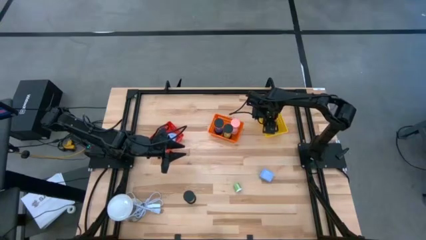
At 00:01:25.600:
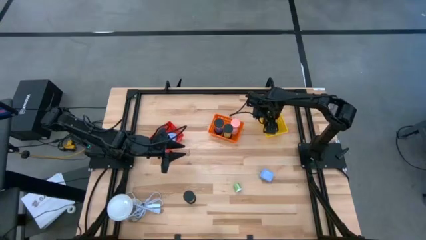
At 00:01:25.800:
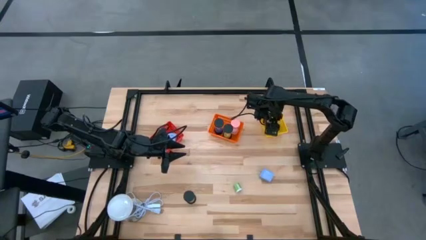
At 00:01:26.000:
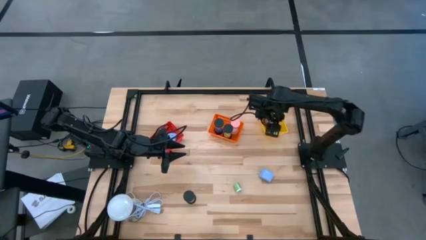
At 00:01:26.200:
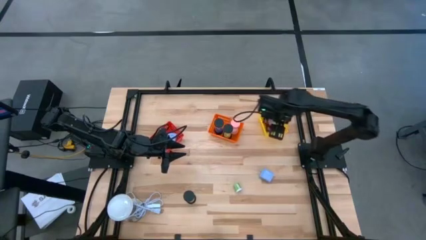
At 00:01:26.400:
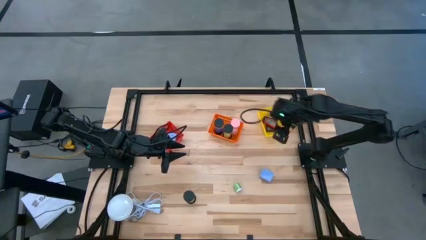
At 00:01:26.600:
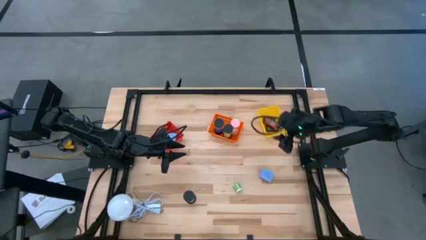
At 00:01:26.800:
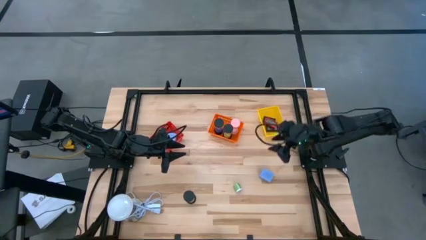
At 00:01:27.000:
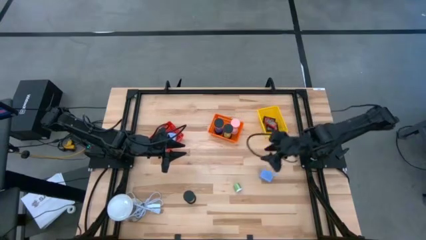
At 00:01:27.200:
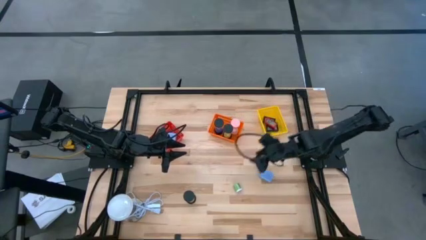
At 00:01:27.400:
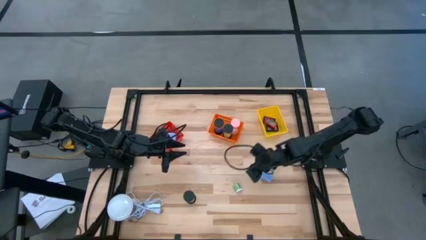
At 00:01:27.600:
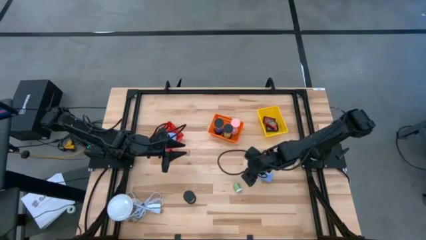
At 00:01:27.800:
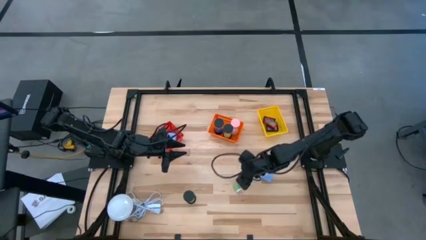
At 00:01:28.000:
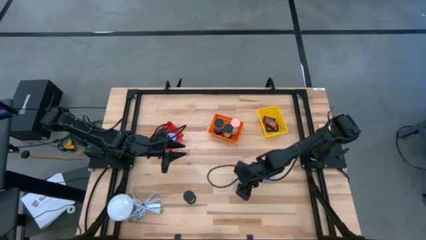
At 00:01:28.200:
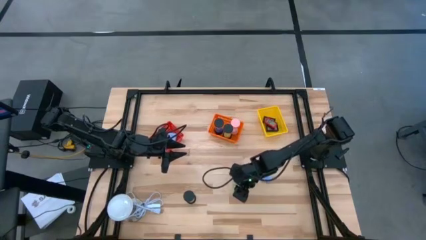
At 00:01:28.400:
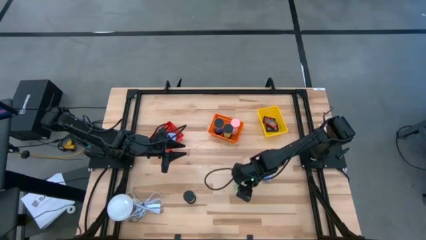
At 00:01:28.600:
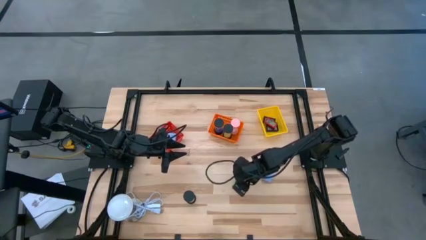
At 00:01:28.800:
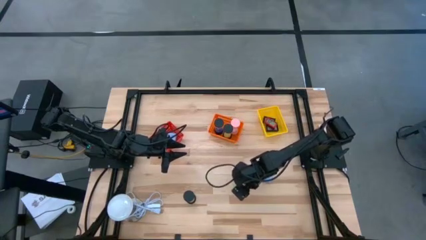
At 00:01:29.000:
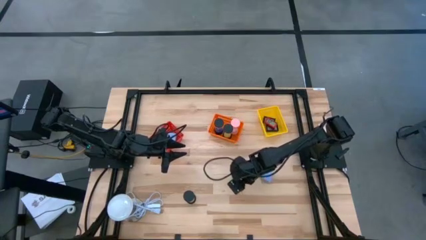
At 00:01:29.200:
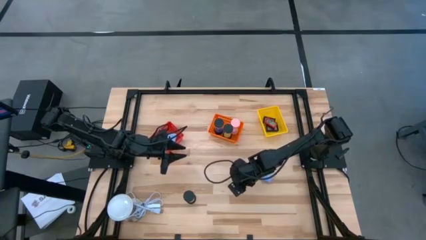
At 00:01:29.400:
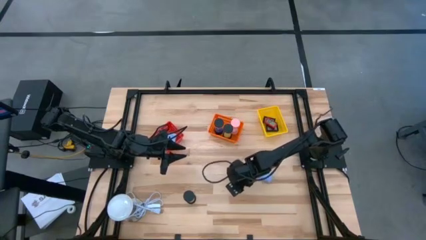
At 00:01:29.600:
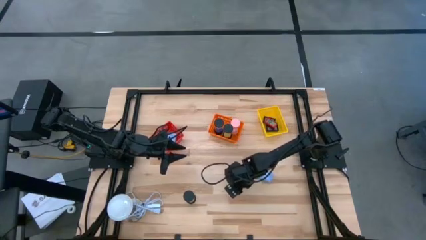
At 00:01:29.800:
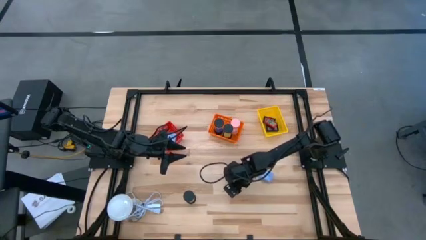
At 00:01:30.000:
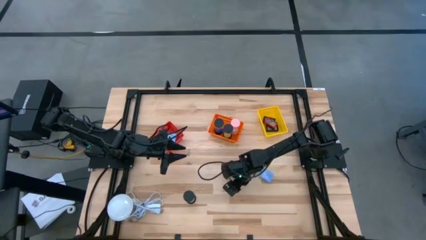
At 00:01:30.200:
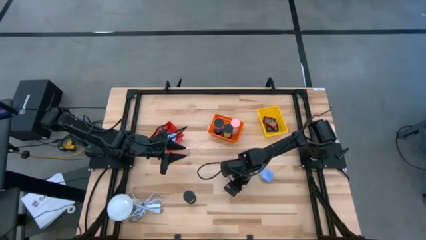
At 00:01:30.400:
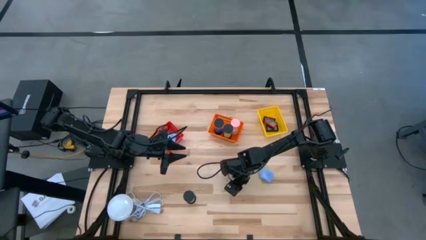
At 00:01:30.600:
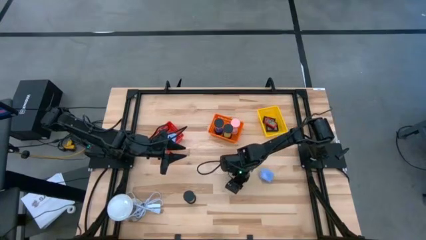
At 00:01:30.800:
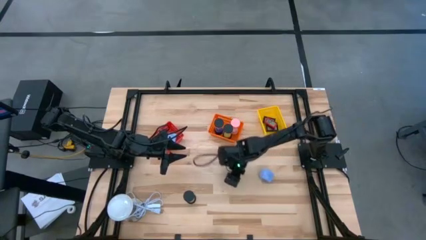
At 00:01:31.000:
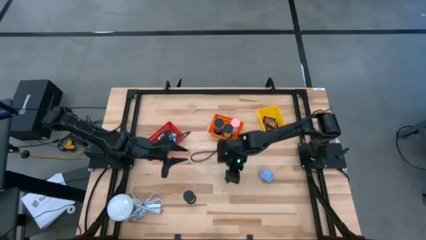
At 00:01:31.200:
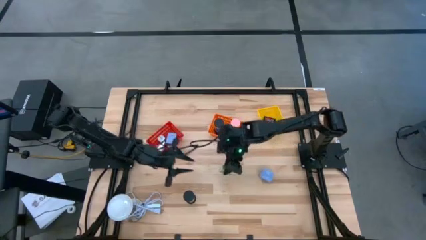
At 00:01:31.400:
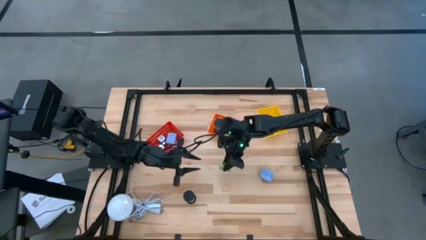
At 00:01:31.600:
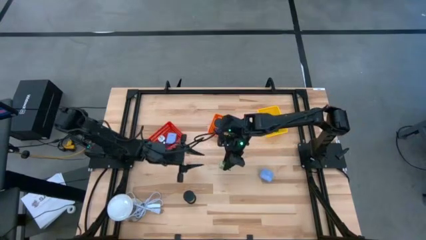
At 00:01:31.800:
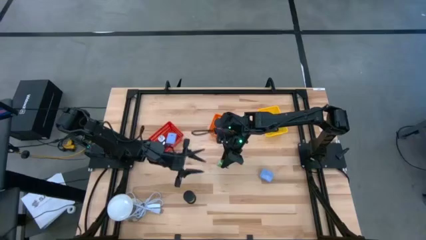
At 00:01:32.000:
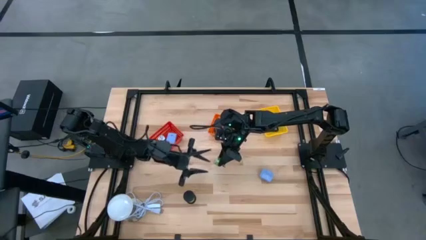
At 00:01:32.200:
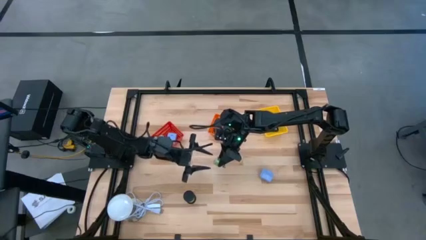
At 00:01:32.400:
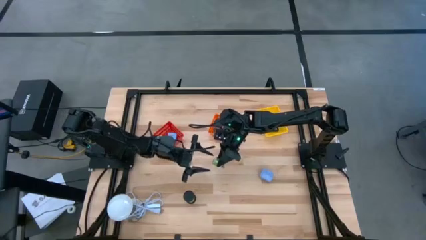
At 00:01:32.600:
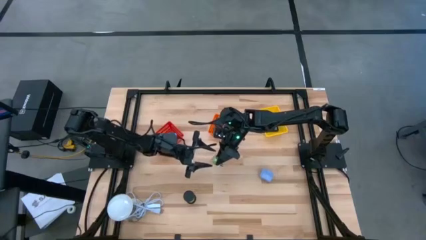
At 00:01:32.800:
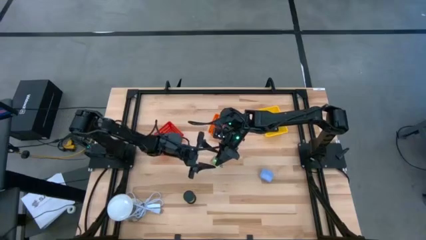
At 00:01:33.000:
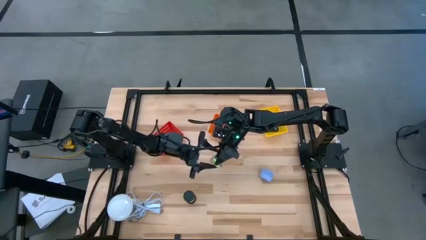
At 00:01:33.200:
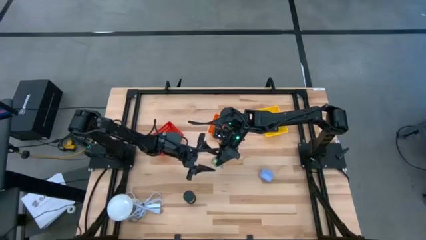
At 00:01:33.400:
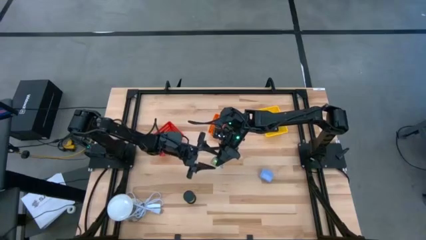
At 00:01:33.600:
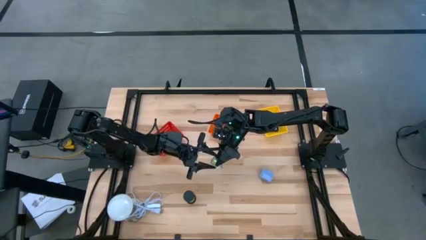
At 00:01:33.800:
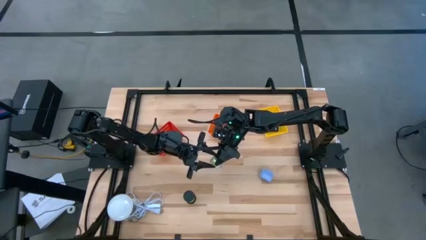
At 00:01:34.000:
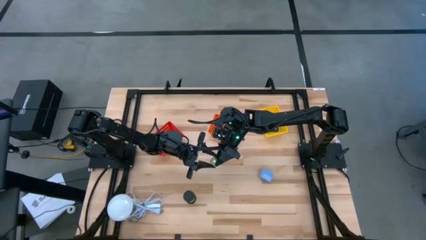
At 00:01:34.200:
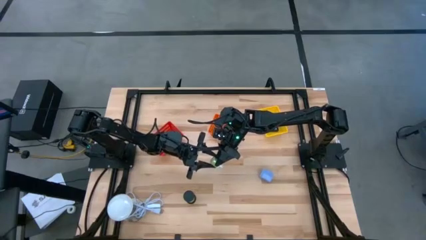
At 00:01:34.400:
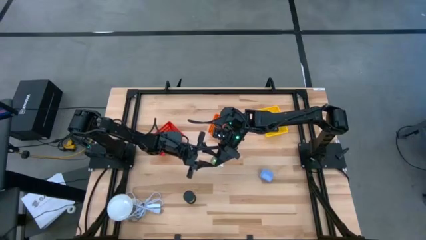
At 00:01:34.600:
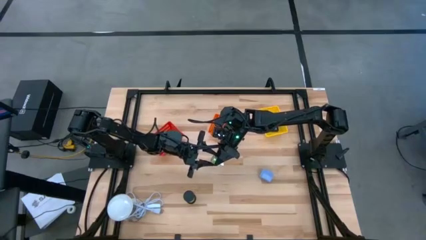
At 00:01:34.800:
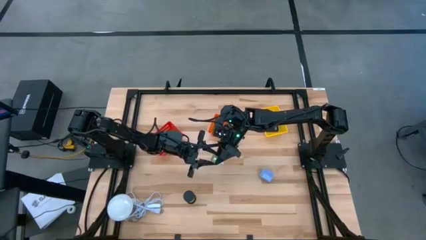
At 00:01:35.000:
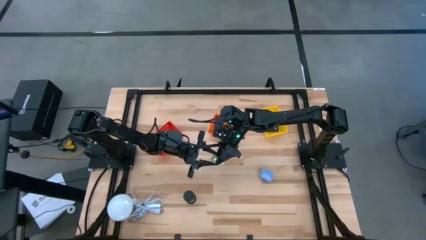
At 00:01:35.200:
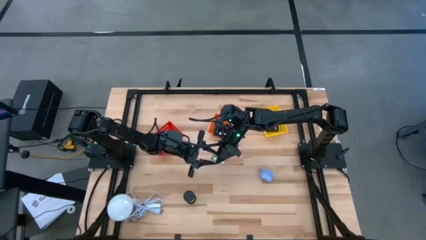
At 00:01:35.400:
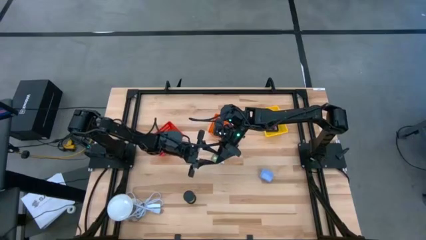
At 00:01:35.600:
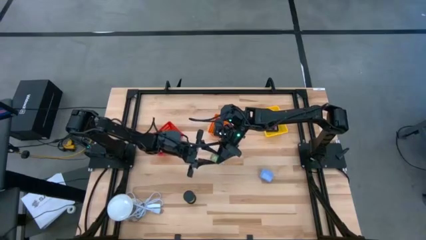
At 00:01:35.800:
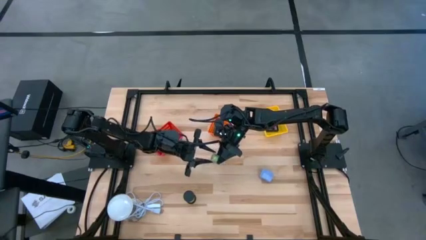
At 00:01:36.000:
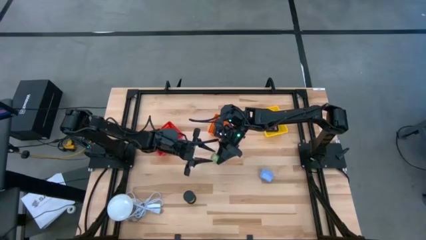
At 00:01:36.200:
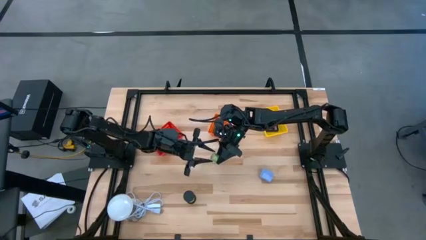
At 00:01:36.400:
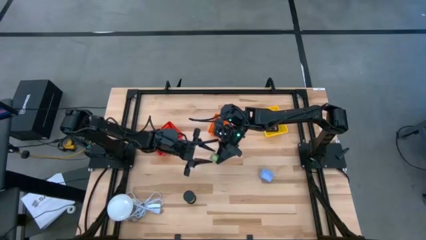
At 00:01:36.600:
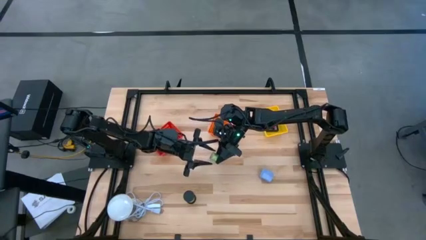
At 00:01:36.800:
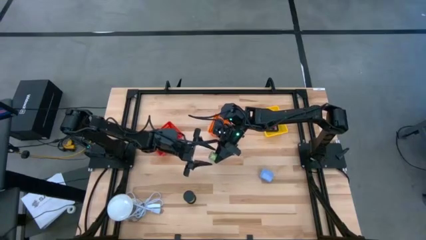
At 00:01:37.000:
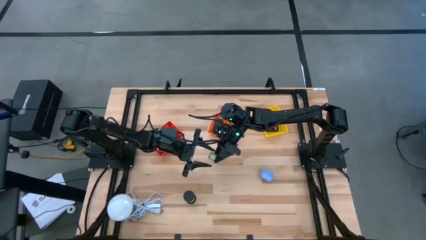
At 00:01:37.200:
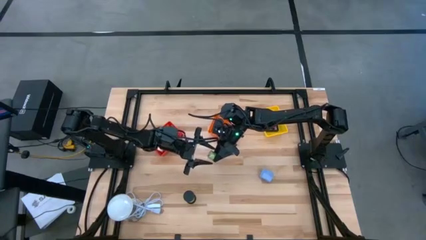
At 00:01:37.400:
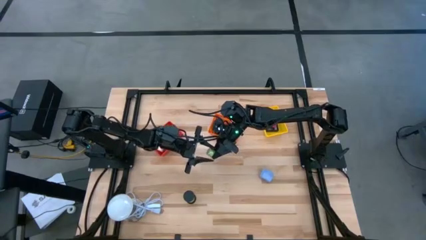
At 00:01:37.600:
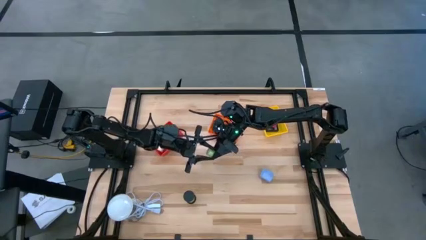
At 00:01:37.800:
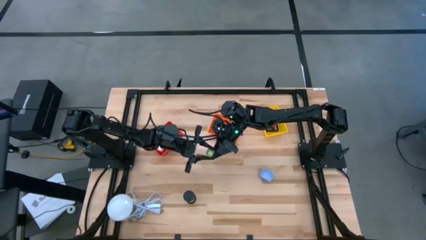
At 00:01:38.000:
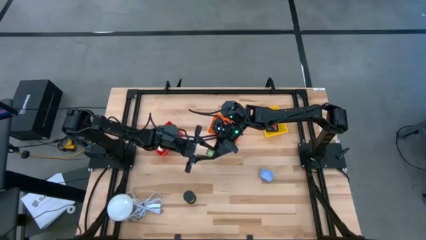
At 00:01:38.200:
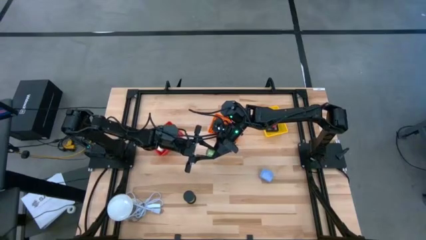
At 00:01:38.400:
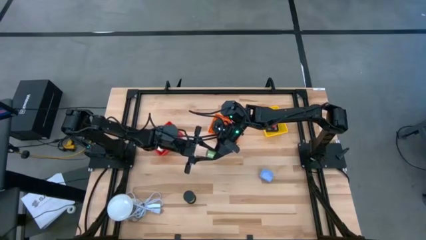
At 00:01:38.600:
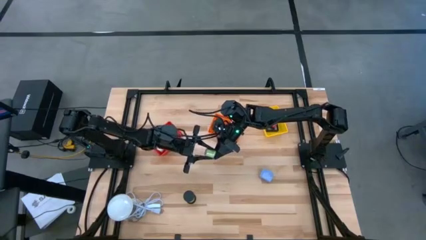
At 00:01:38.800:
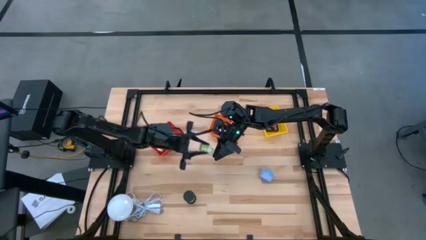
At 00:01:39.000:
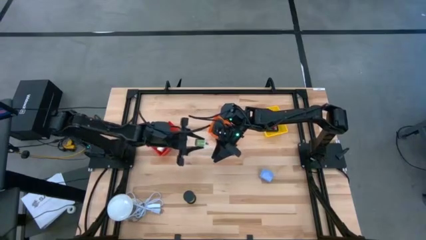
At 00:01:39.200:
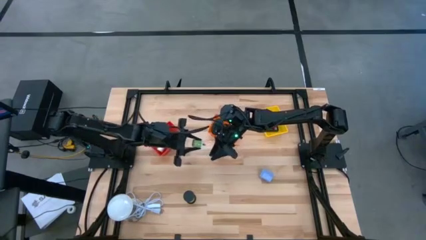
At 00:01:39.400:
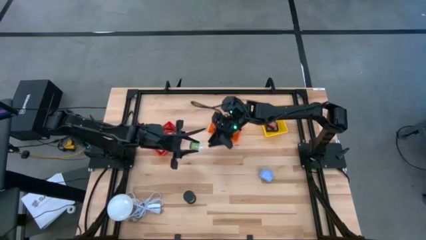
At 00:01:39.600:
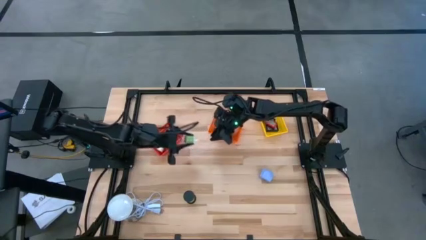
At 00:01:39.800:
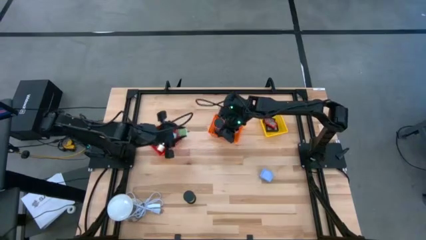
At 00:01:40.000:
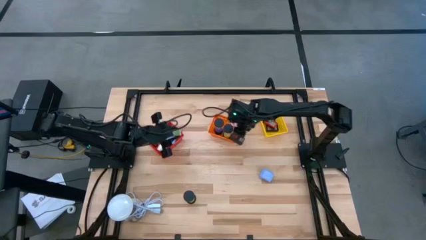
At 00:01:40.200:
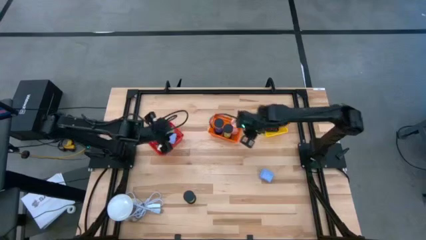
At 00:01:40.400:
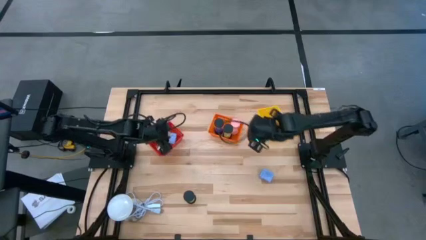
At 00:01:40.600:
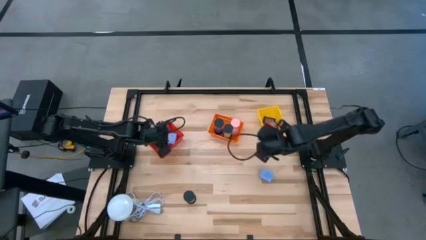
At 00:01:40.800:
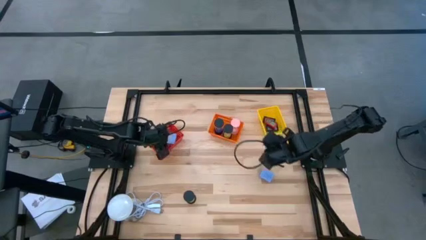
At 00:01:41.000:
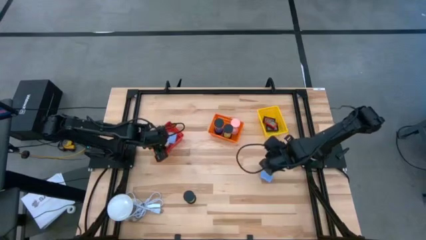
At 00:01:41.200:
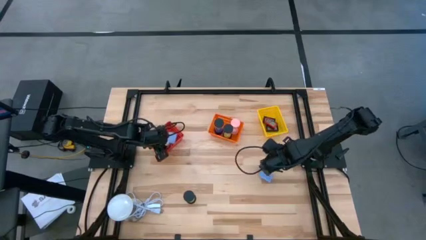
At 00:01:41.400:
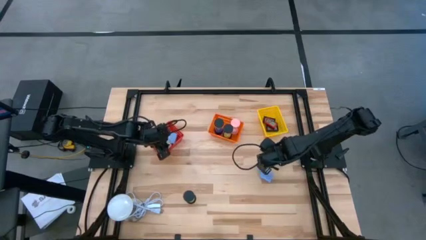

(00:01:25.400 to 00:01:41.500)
Task: Pick & Place Office items
Put the green charger adapter into the red basket
